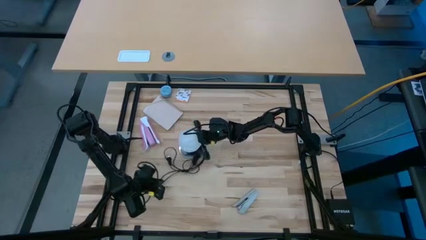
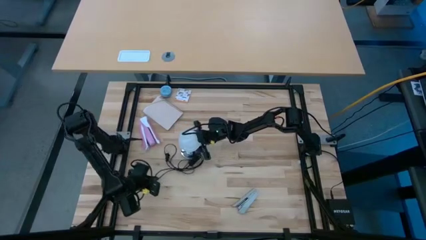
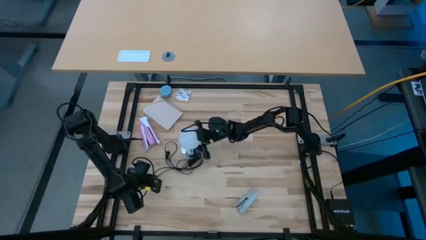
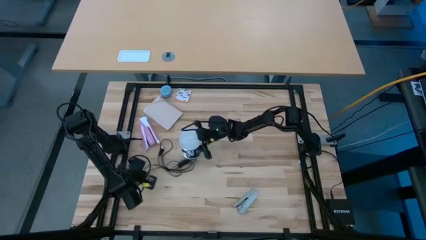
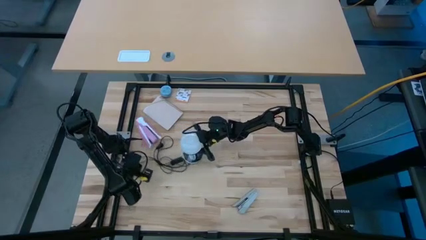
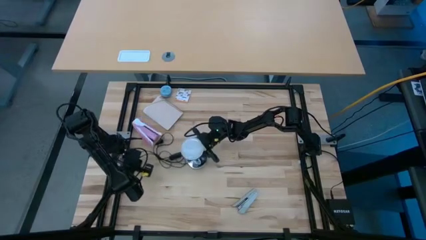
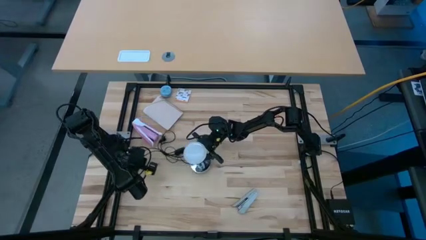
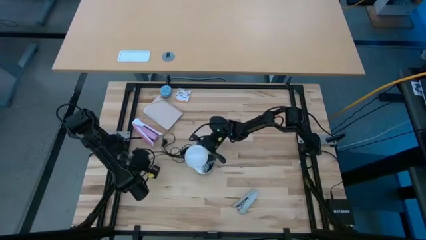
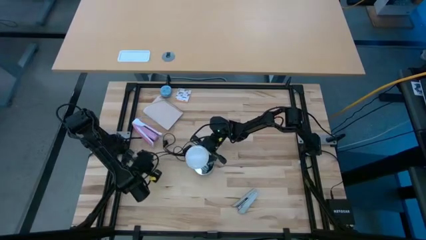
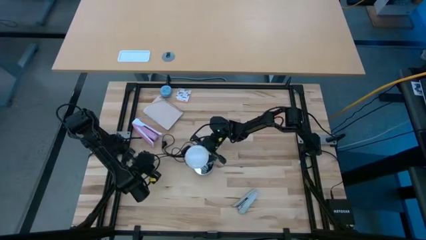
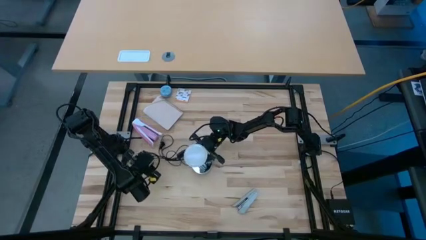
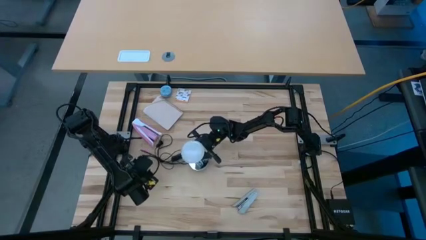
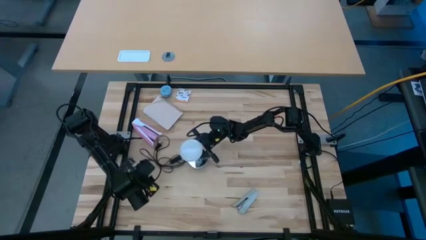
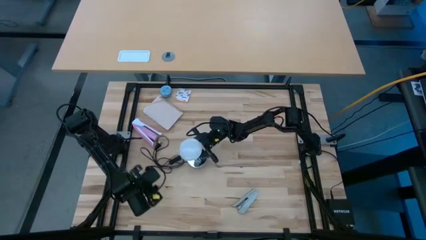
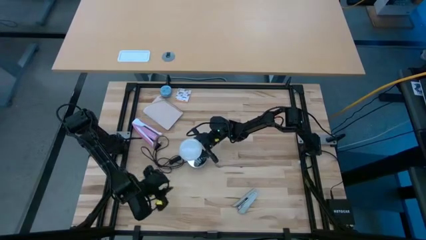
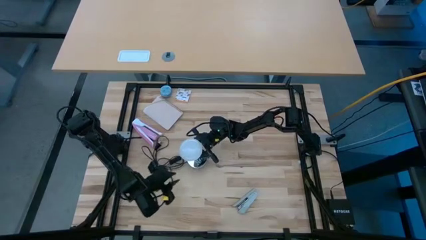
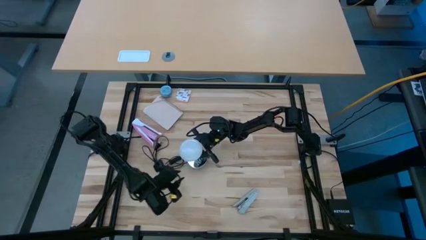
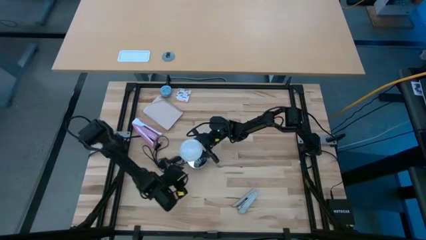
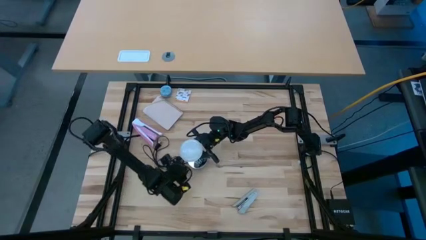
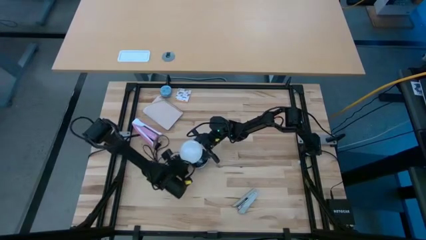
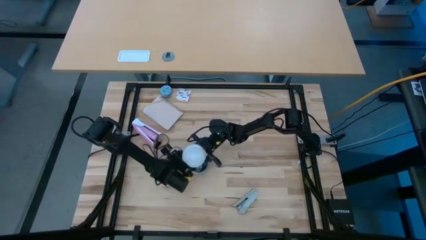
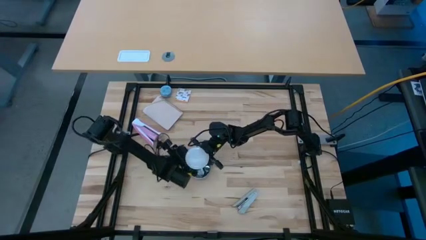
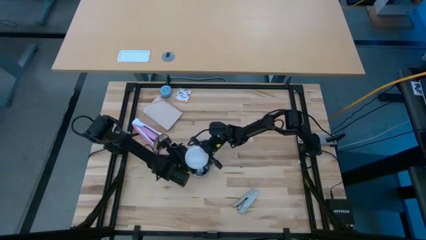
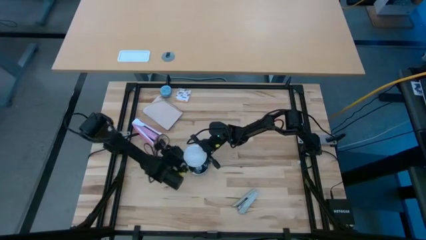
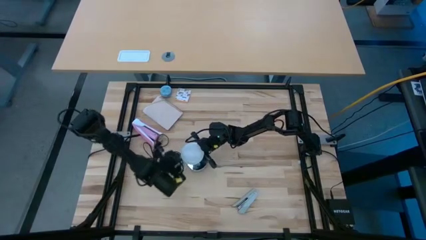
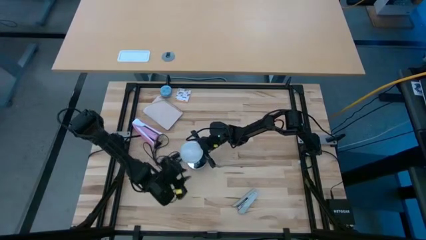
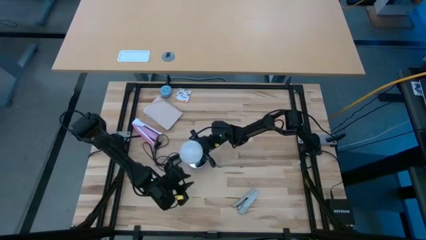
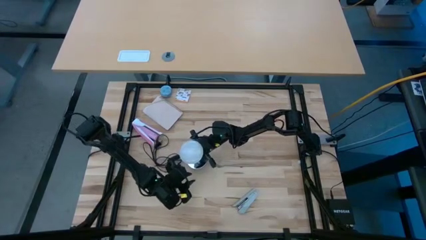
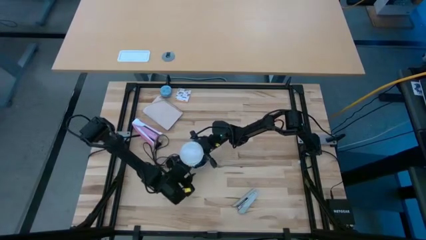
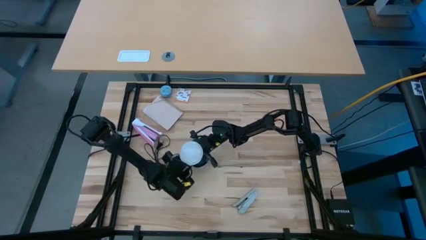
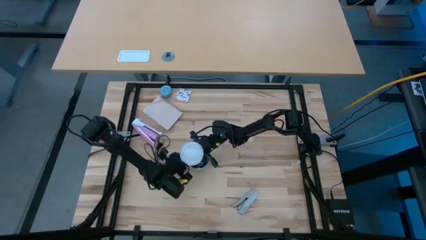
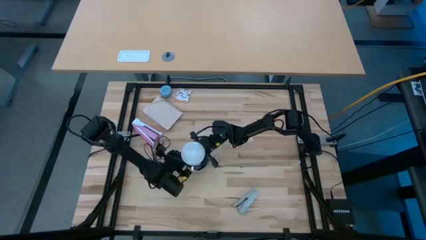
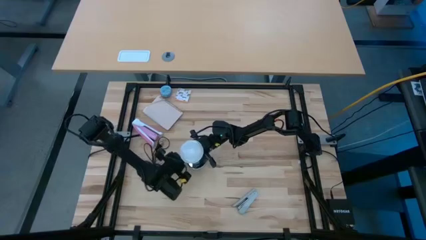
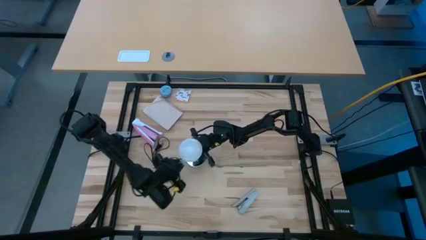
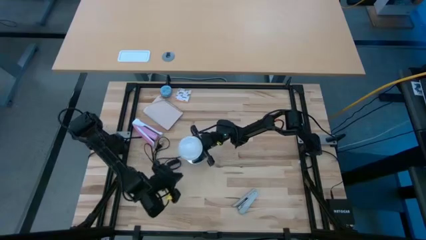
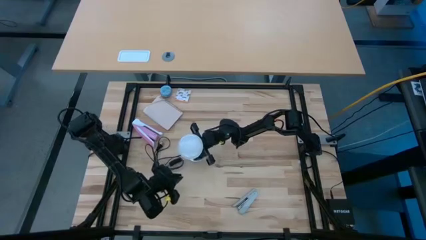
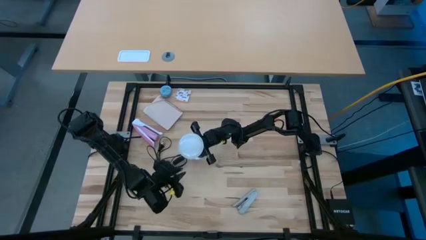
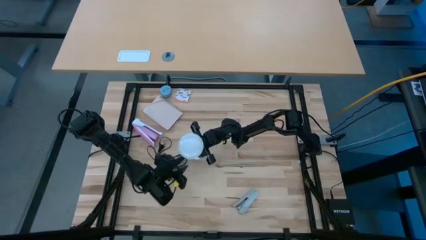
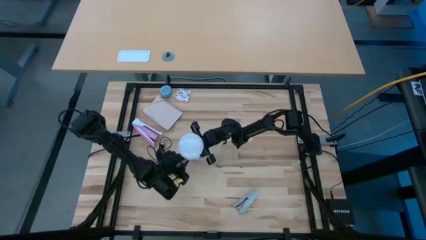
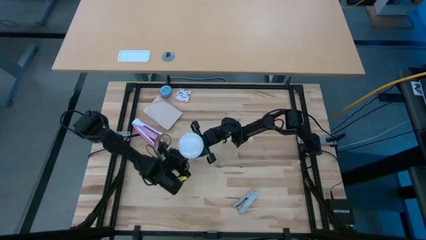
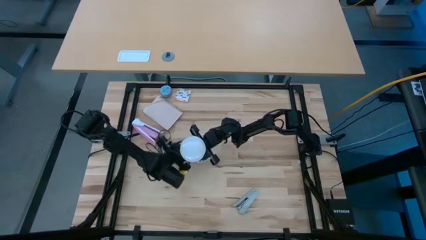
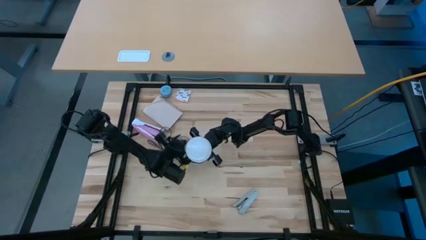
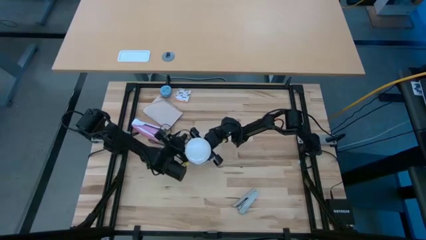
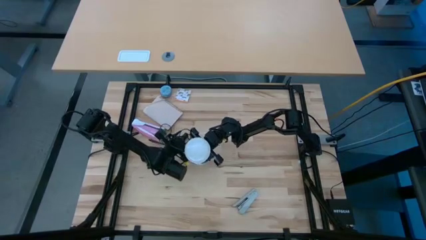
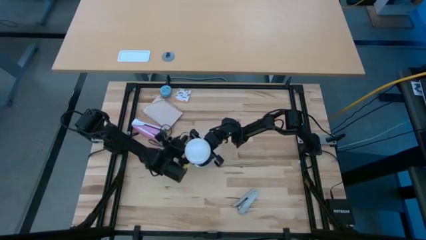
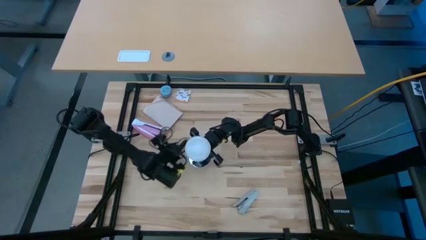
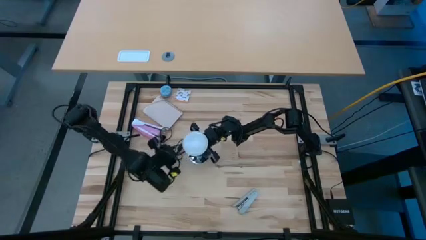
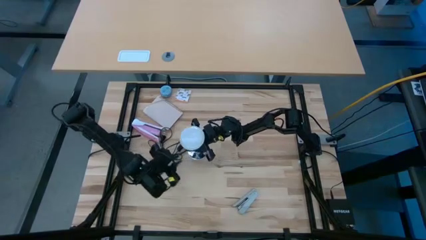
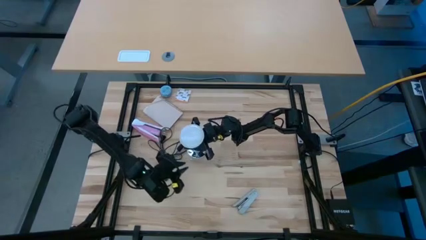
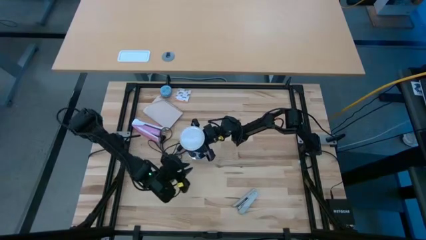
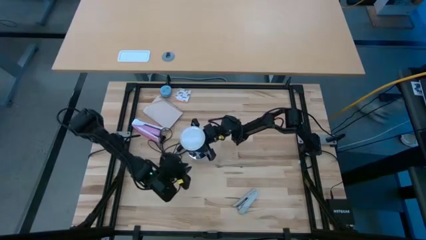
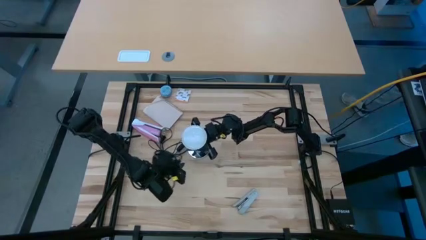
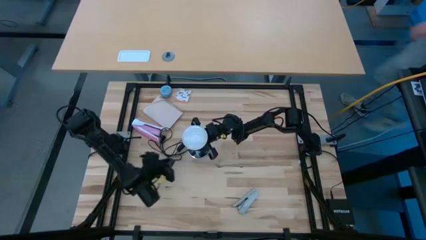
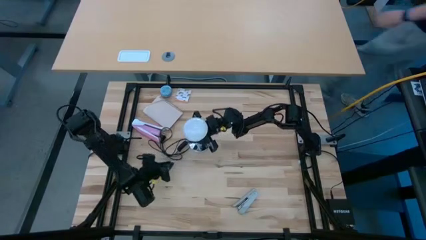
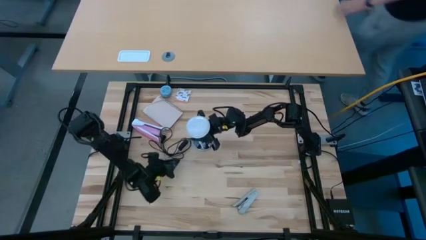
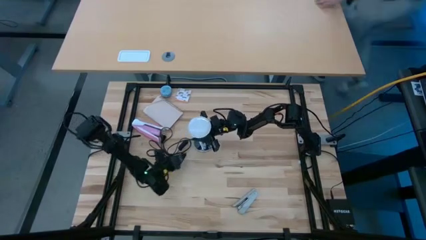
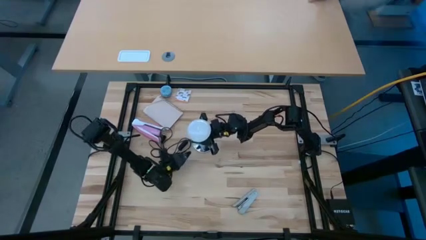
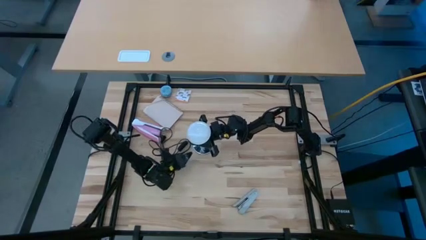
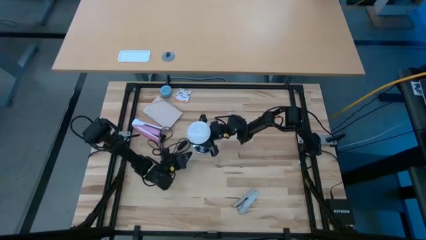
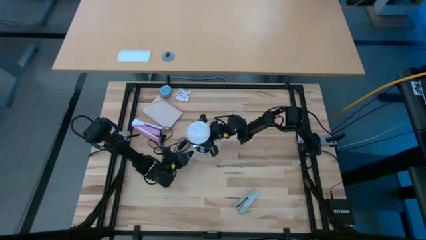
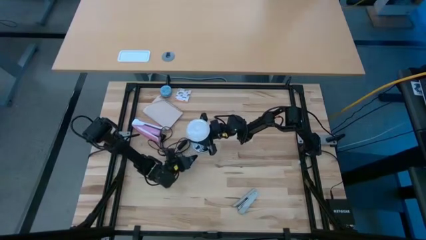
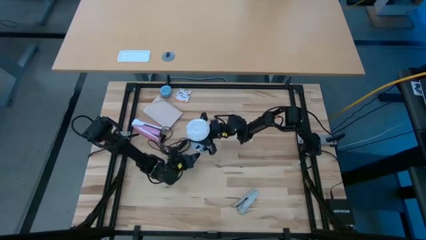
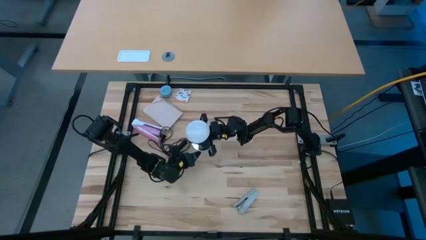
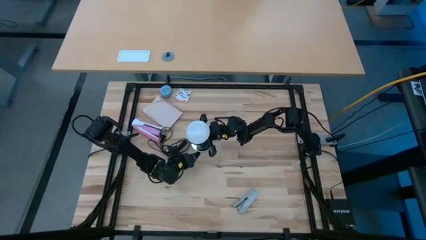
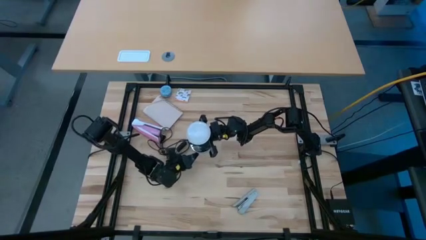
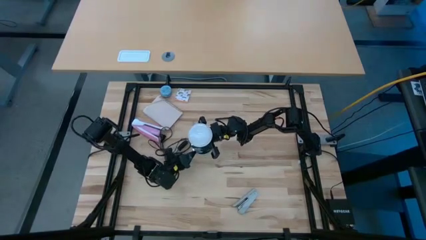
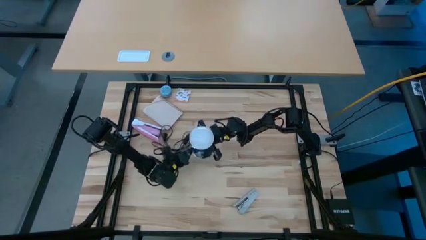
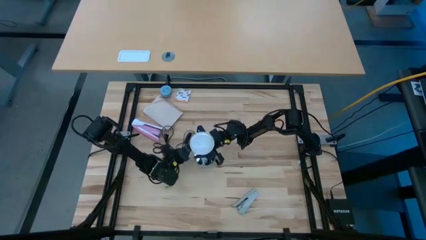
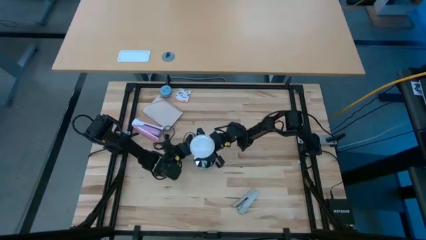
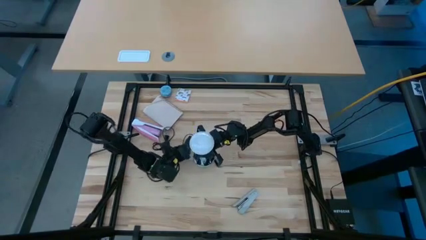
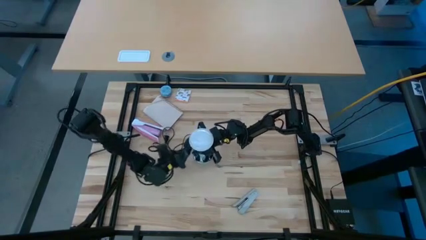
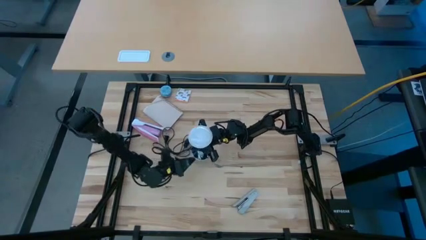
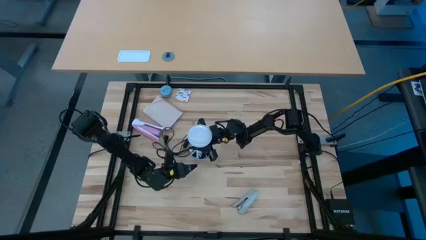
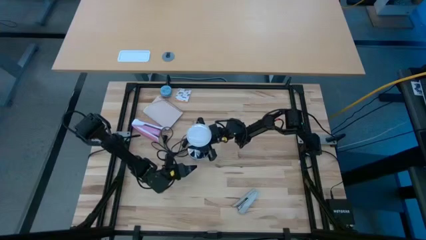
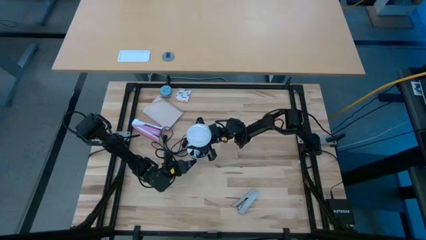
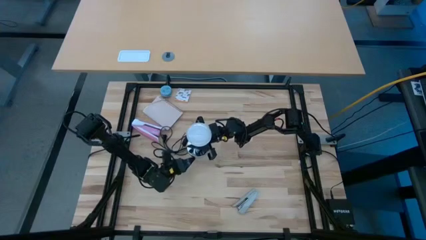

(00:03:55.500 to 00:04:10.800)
Task: Screw lightbulb
Remove the lightbulb from the lamp
